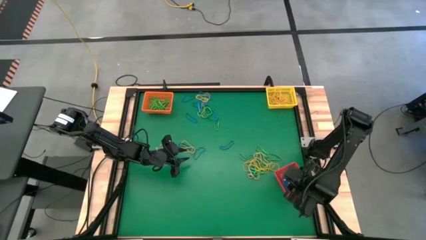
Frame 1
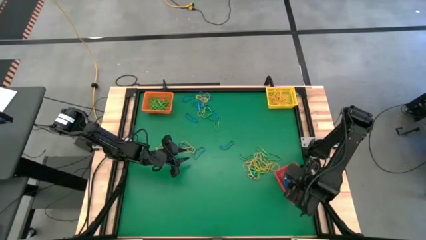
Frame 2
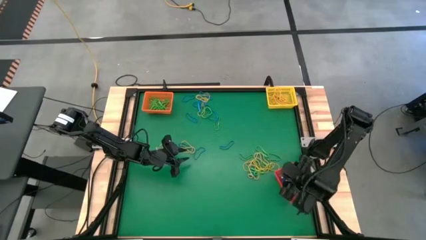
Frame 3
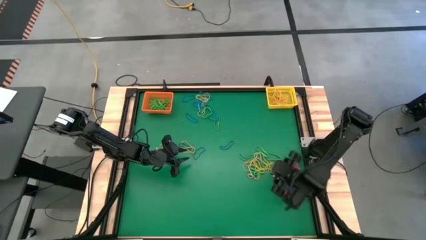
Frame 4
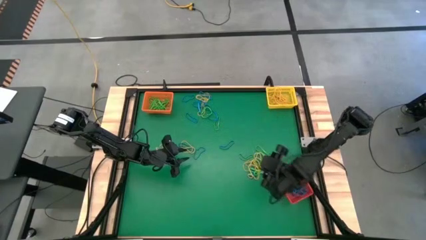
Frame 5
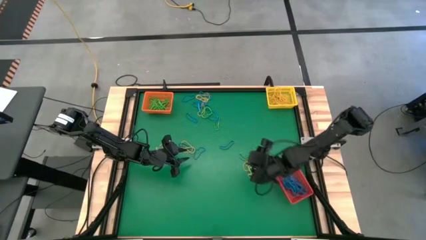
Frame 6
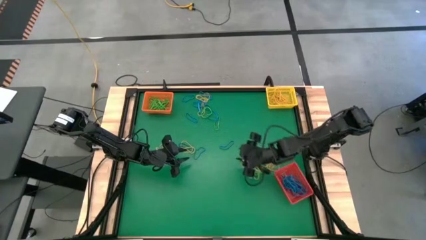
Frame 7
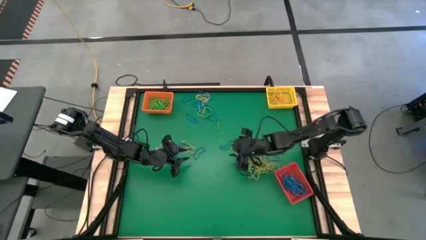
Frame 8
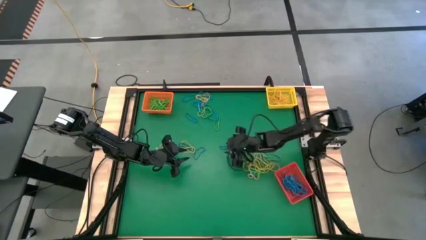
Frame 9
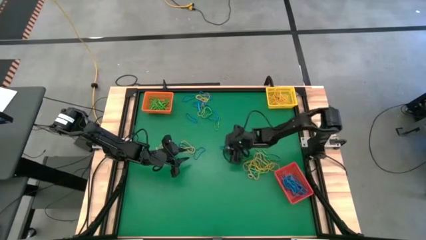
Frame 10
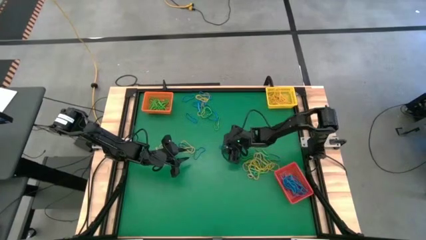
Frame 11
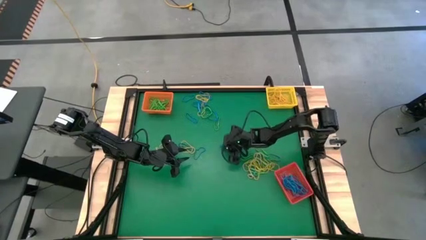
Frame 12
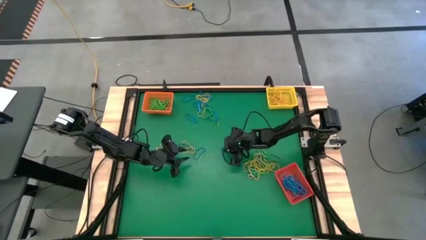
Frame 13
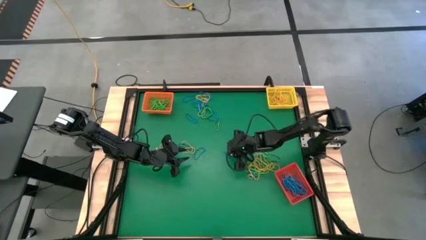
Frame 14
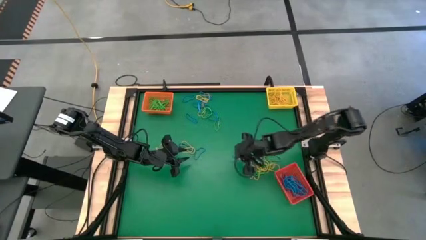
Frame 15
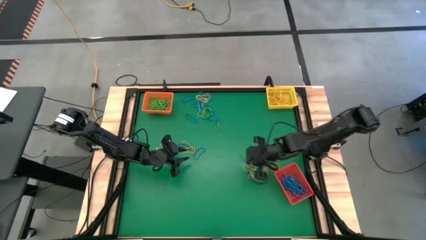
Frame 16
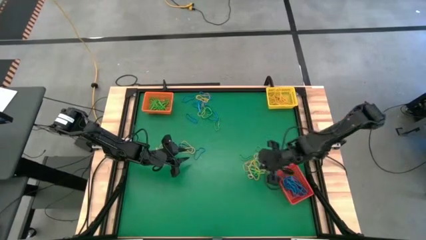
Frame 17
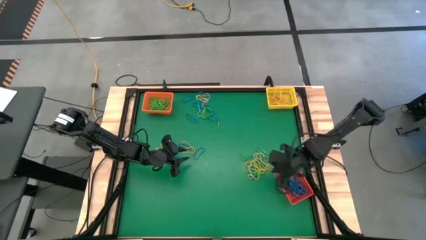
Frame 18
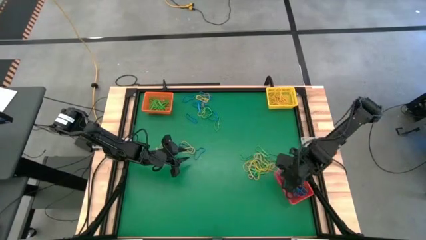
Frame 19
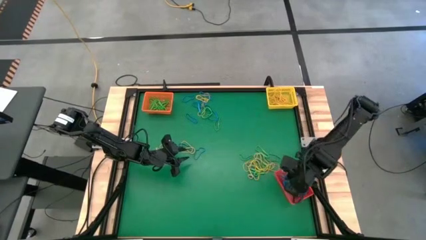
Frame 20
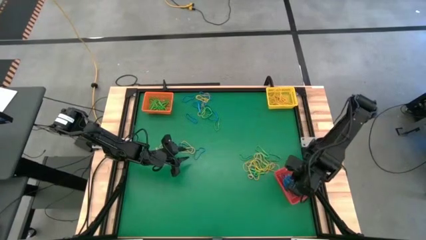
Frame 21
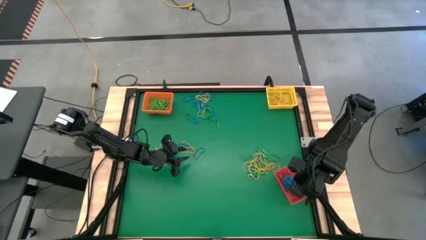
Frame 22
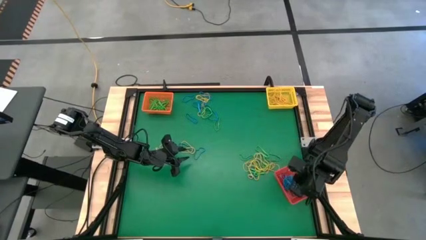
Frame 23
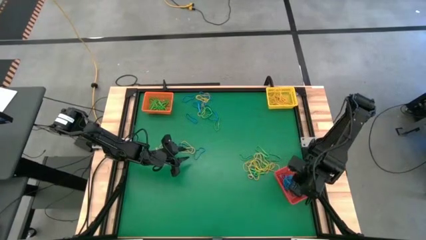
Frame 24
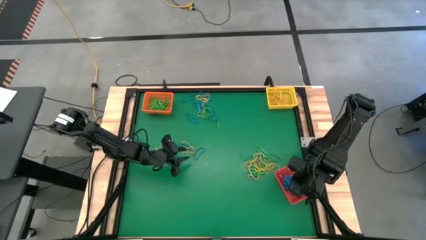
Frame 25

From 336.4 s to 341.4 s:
Task: Sort rubber bands into baskets
Put the blue rubber band into the red bin

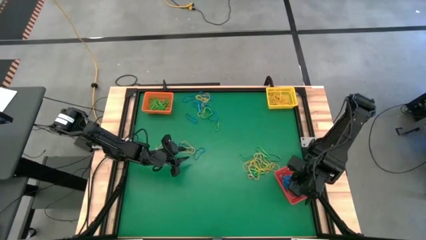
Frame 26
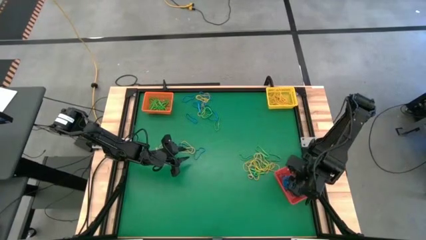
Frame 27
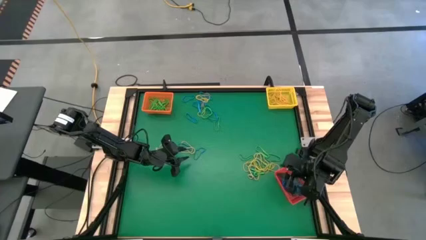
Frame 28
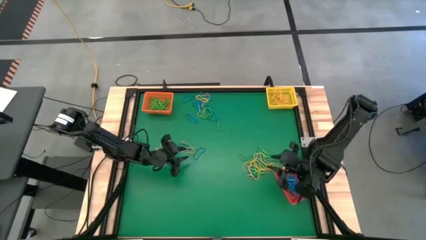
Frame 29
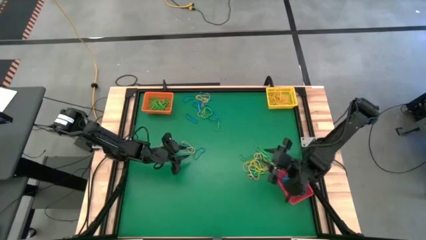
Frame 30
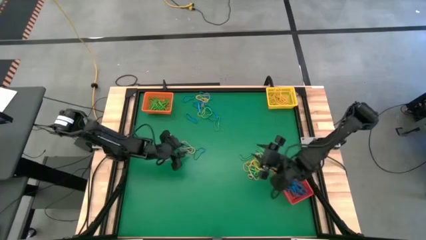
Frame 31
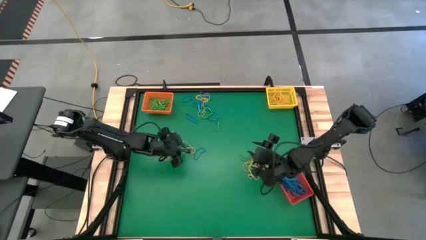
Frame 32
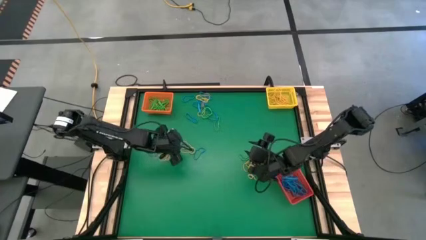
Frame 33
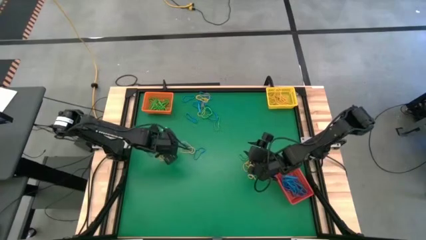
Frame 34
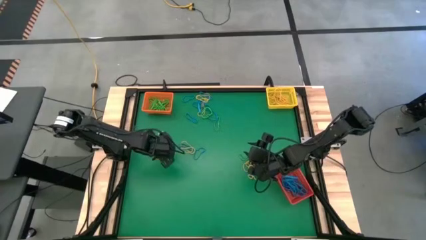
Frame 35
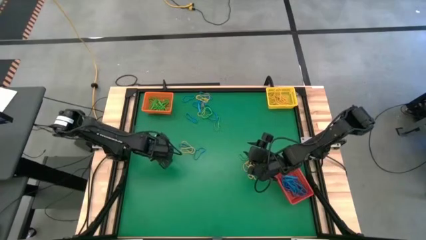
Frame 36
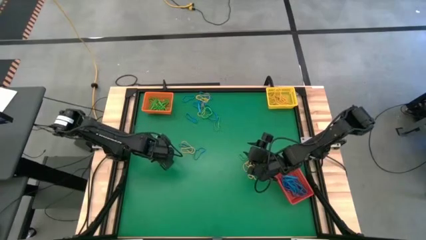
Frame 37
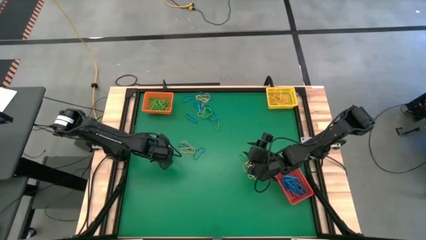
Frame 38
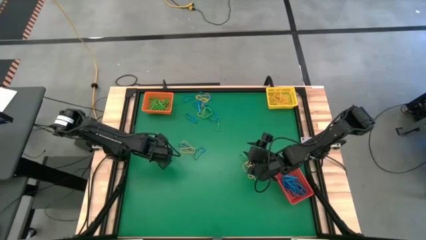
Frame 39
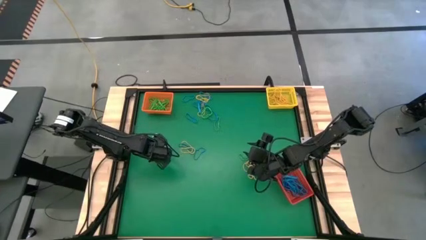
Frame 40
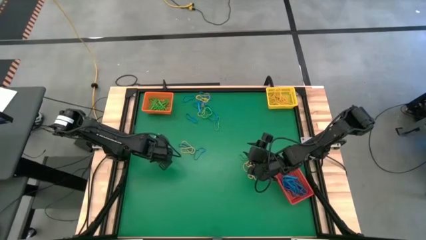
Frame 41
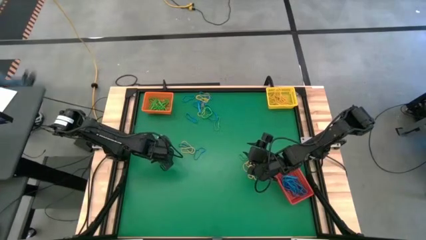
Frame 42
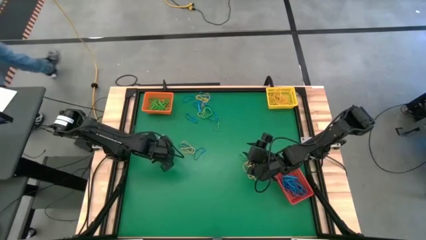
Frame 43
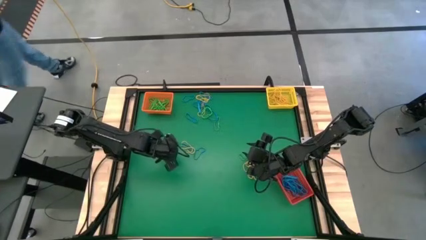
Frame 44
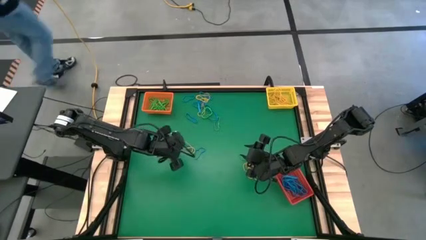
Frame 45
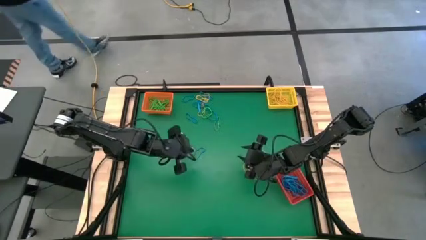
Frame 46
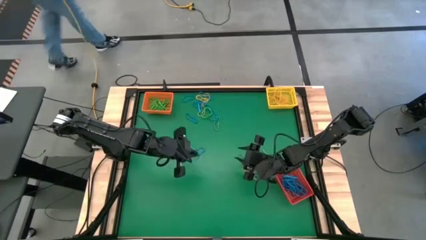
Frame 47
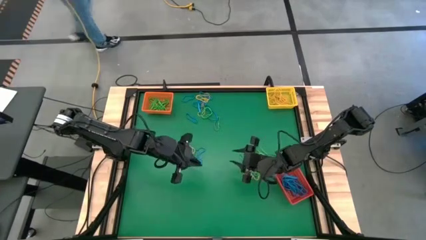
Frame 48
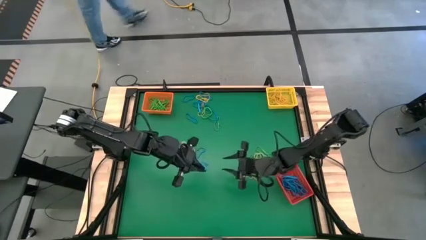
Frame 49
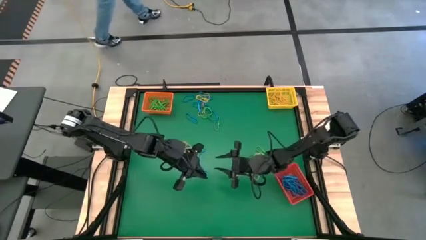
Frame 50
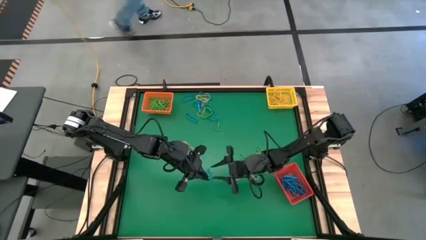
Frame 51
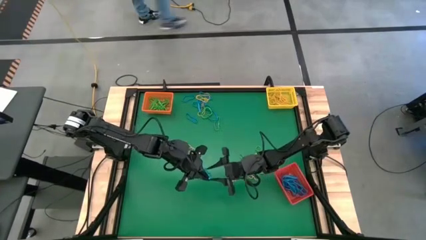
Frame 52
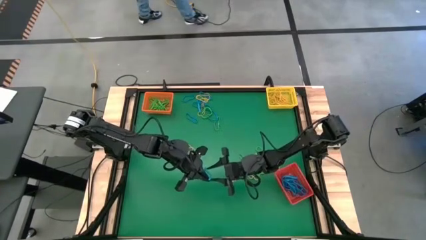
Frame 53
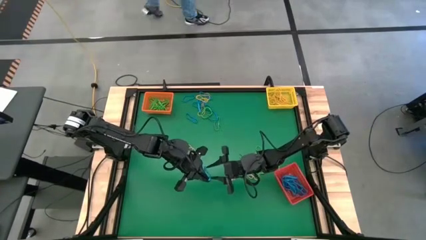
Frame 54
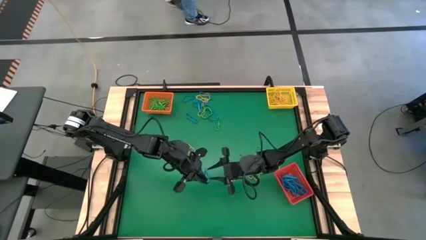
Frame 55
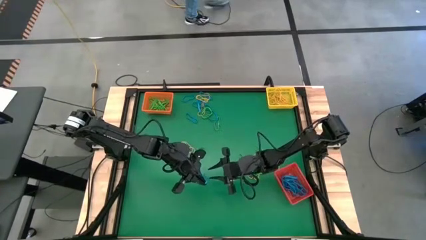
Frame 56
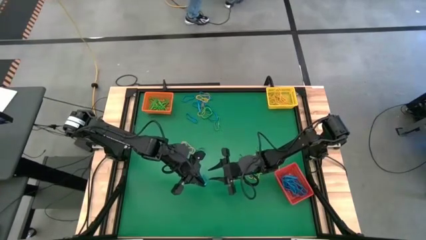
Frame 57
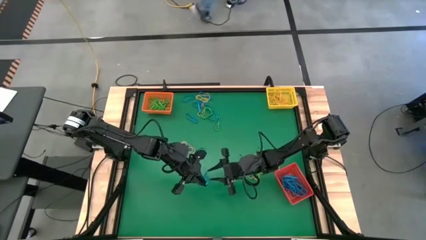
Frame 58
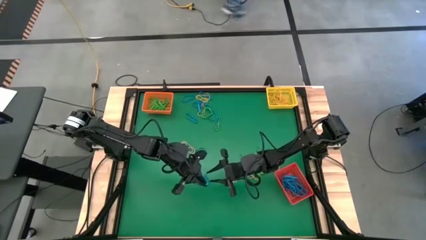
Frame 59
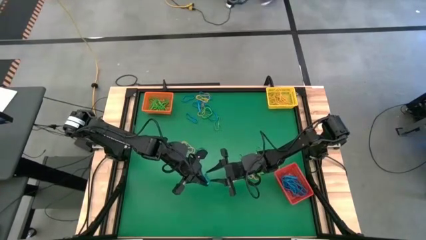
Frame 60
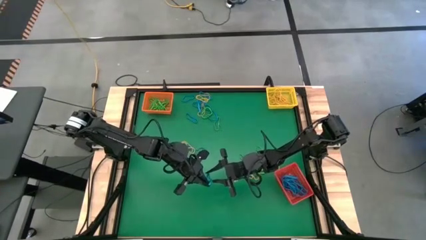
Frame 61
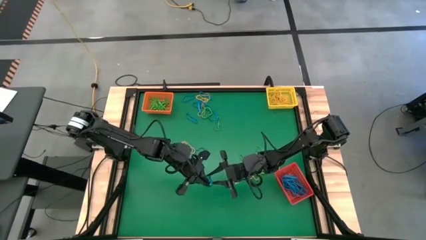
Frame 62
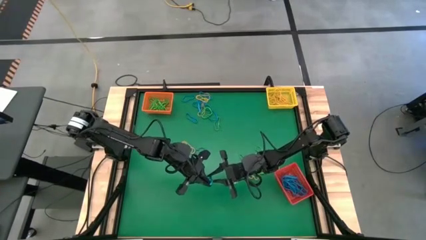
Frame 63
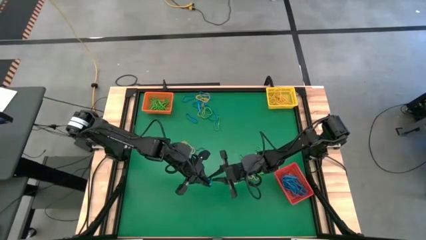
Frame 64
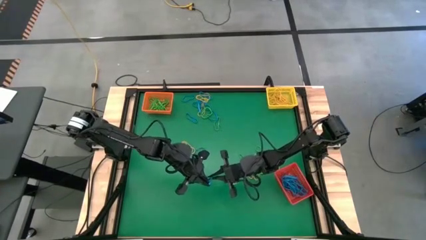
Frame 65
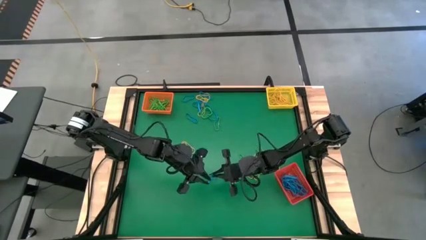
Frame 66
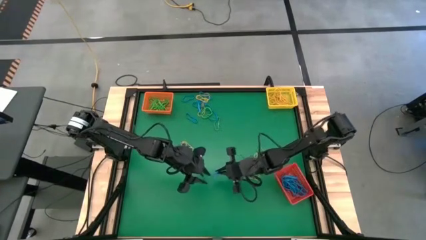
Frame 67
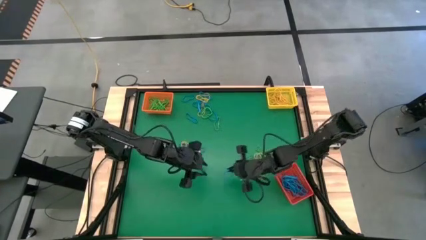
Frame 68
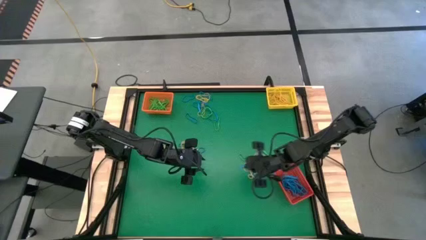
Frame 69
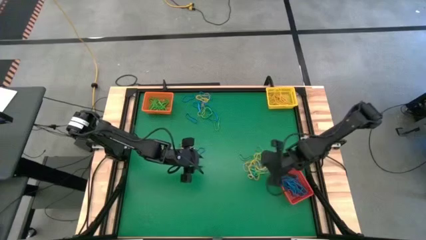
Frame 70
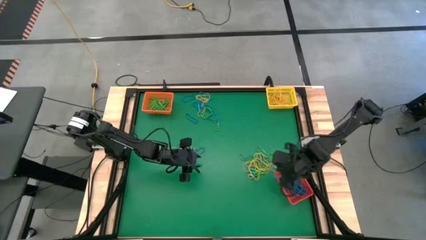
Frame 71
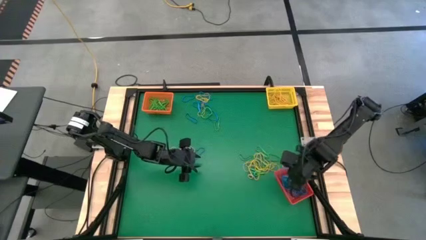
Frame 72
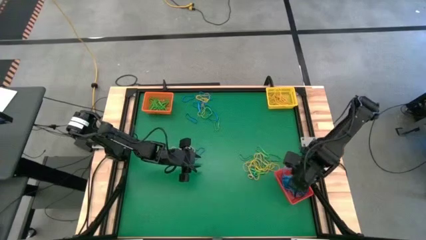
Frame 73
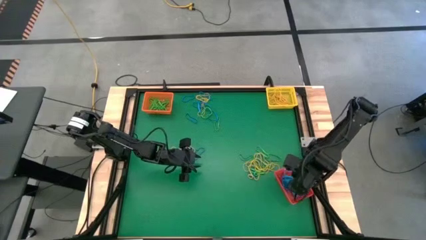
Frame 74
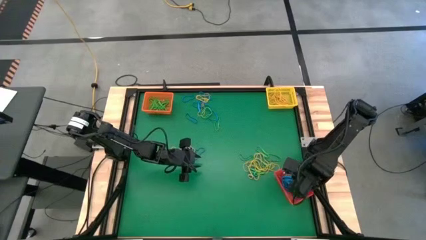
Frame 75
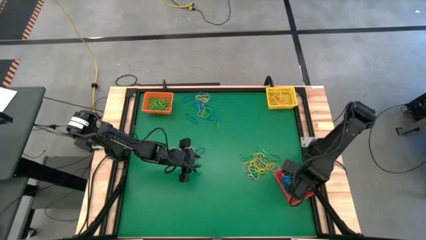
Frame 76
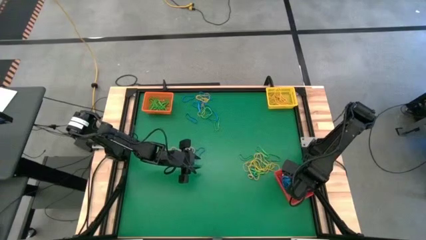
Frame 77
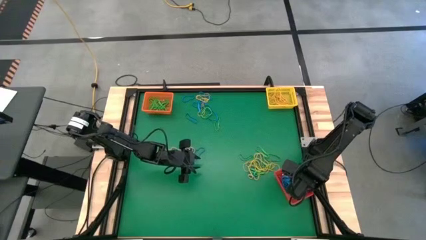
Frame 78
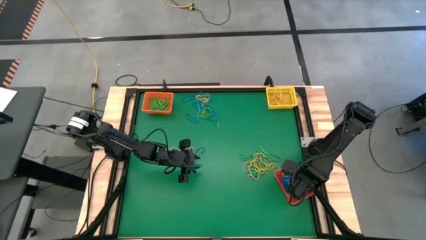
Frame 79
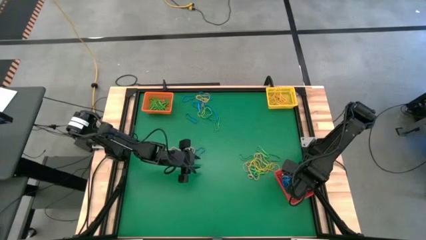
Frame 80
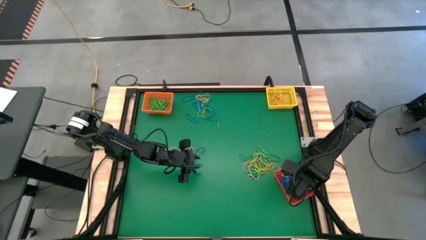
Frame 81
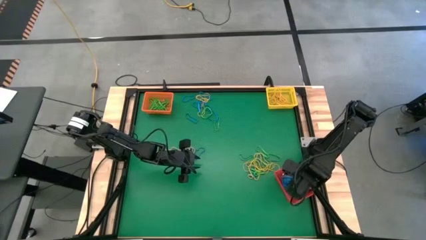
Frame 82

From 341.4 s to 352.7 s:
Put the blue rubber band into the red bin
